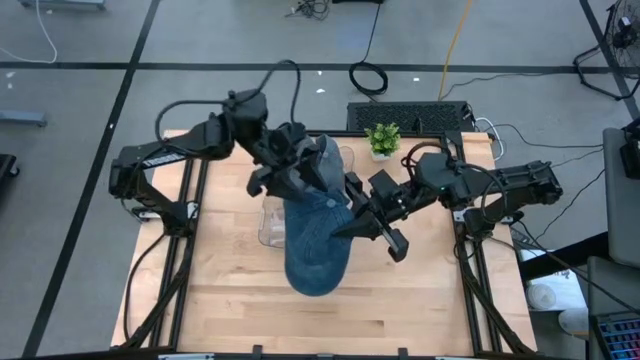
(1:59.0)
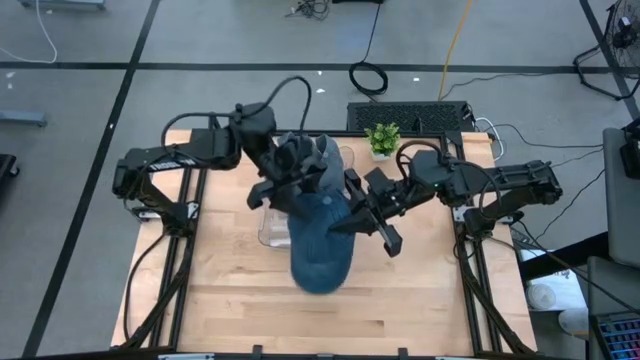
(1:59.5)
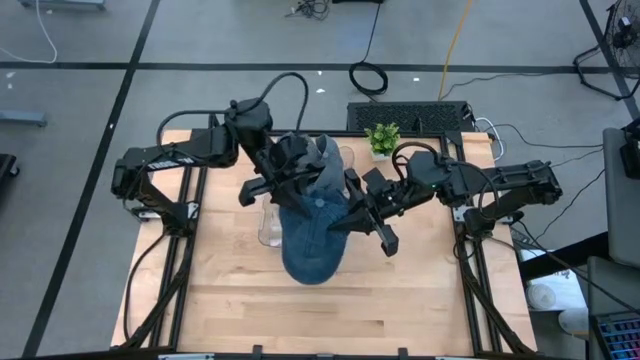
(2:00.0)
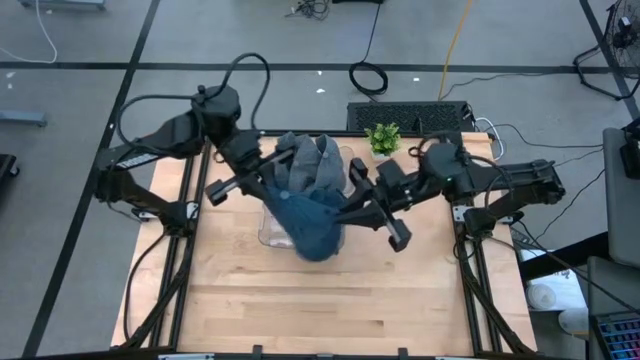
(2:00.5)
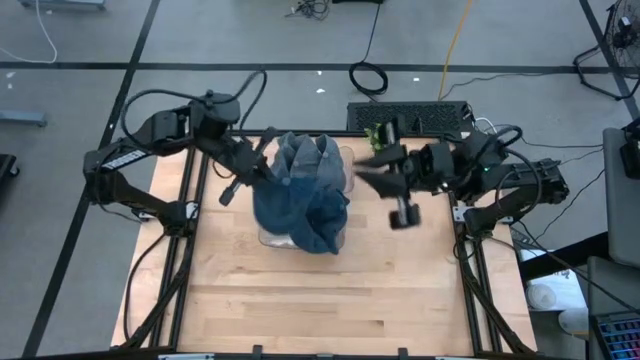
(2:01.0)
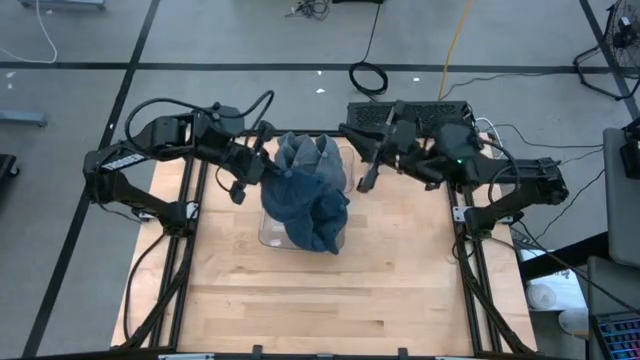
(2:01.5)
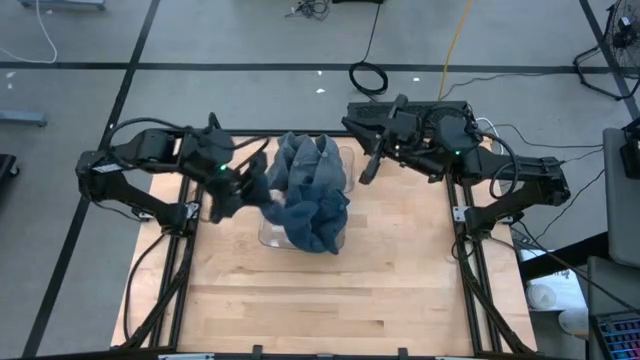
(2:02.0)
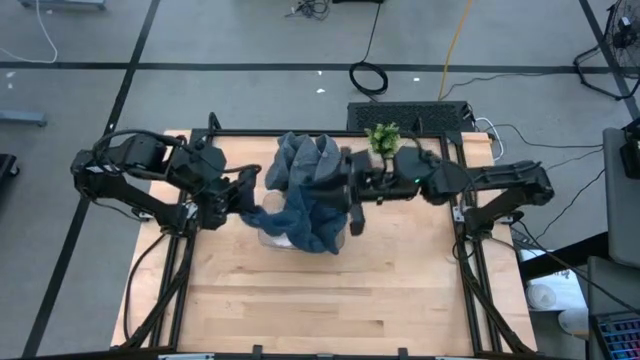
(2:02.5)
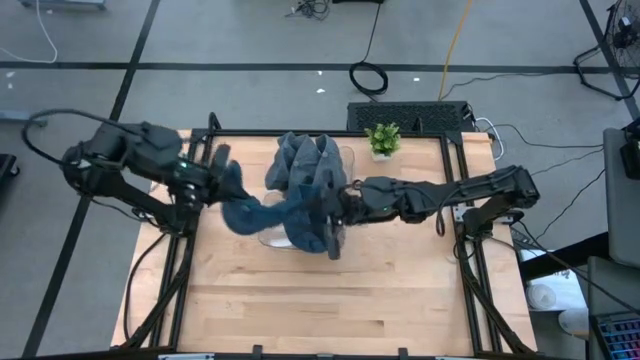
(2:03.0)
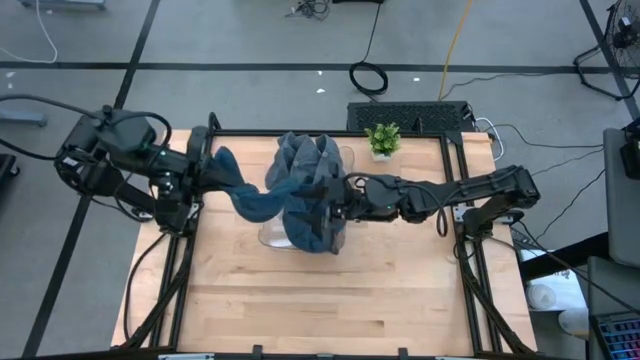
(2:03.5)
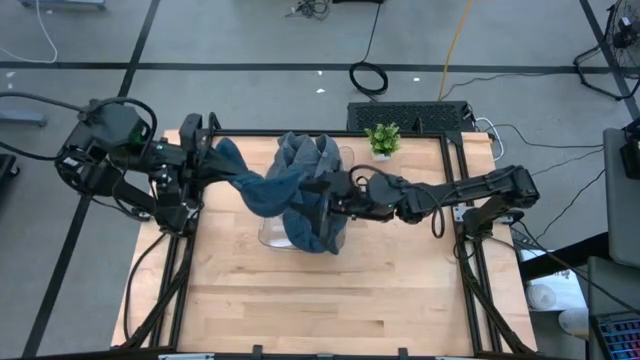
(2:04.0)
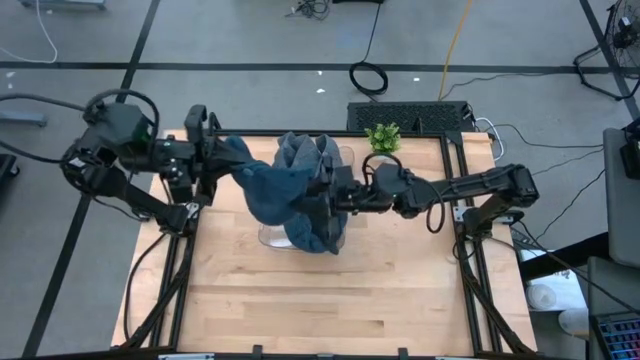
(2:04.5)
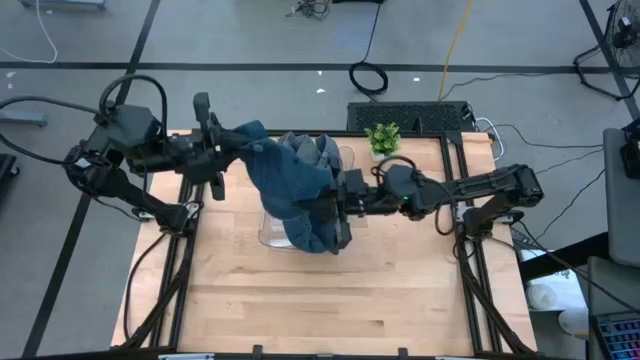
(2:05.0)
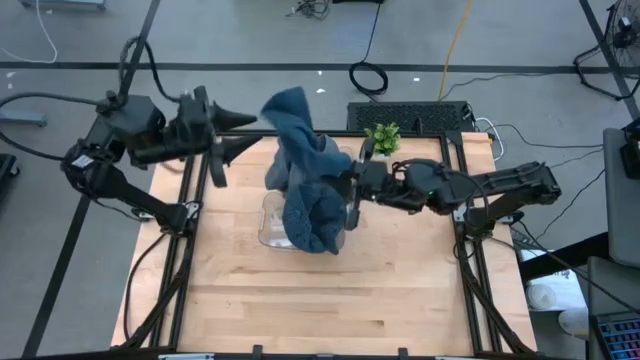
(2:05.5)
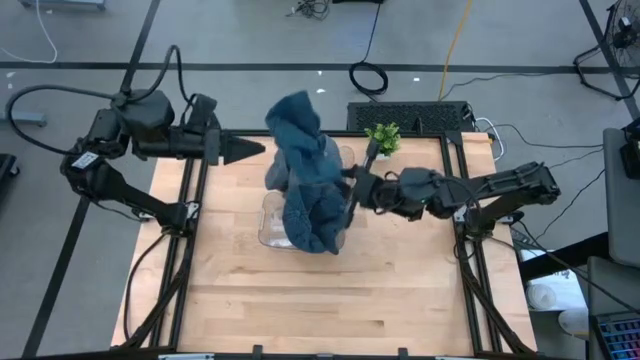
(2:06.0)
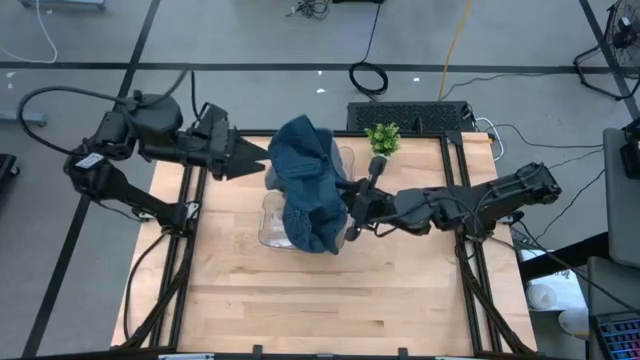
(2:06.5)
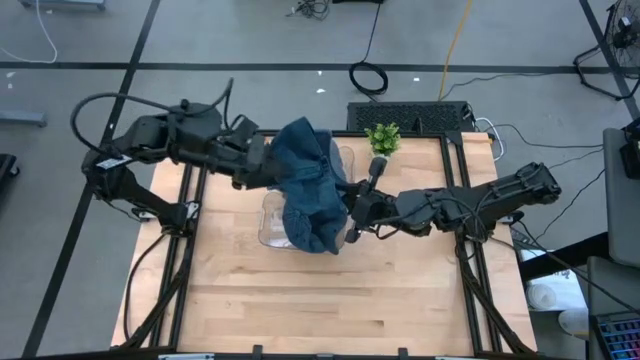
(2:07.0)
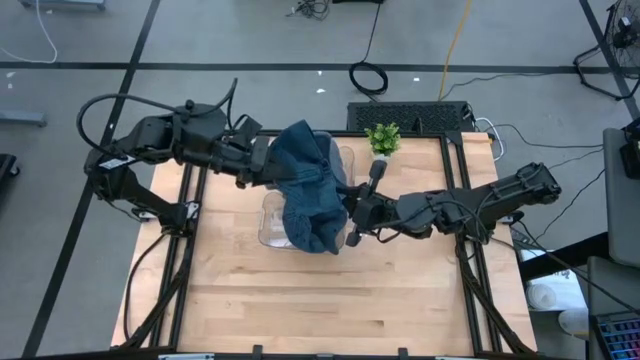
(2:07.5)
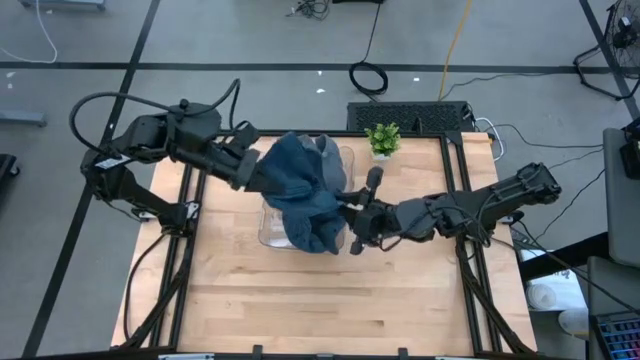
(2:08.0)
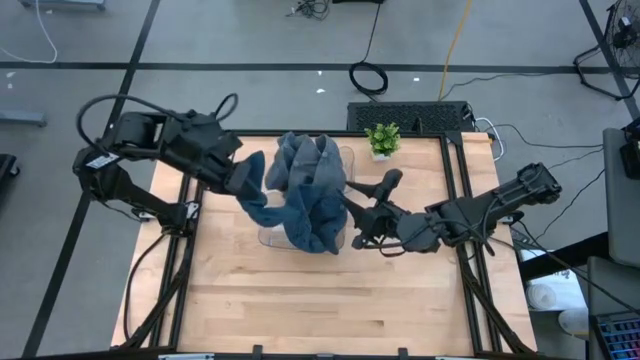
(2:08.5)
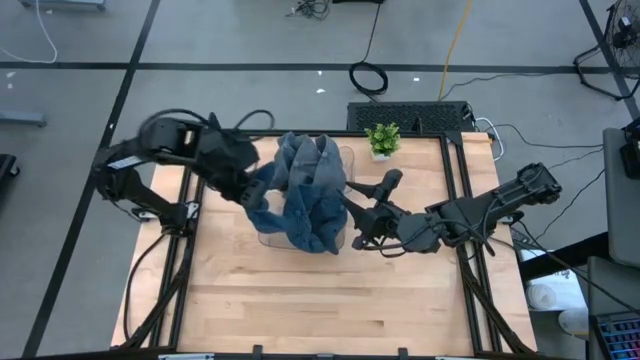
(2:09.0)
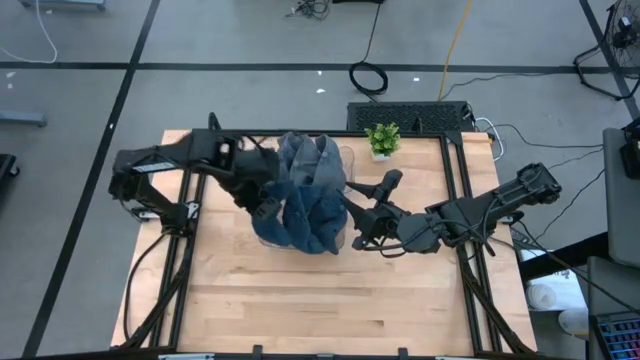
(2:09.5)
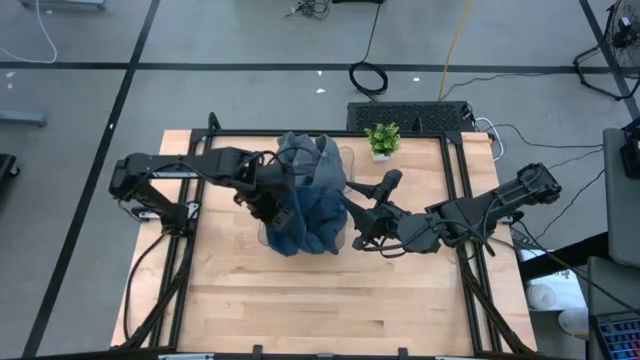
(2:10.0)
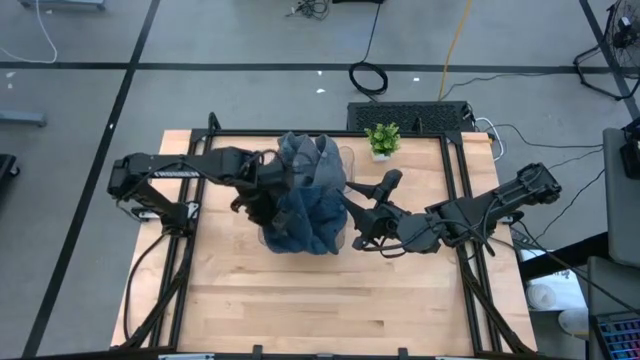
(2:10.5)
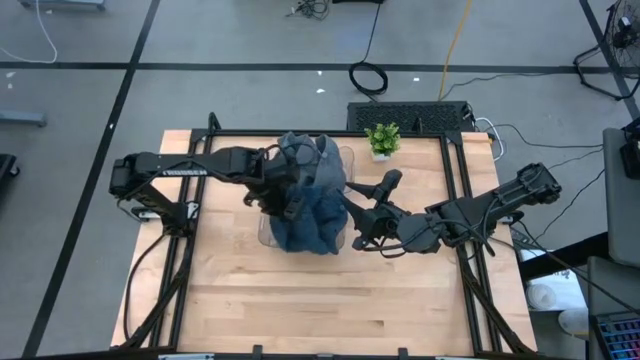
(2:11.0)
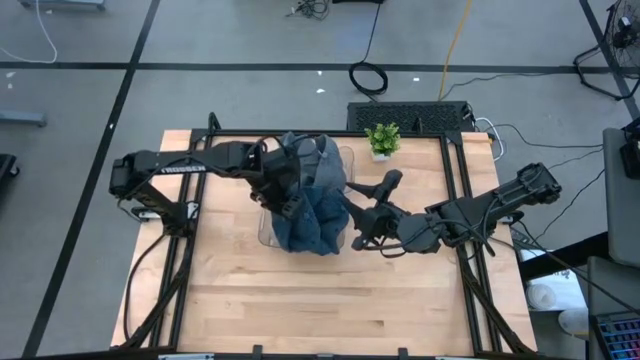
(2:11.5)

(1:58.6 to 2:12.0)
Task: Pick & Place hat
Put the blue cap into the bottom transparent bin

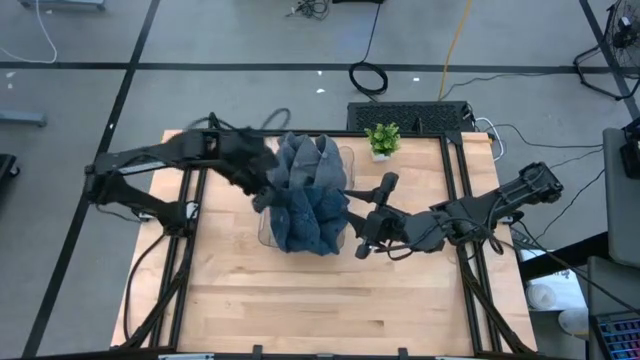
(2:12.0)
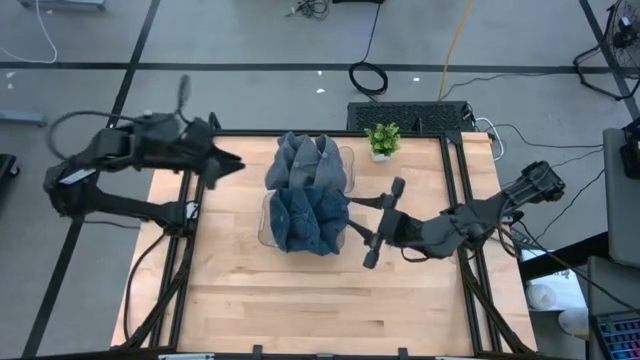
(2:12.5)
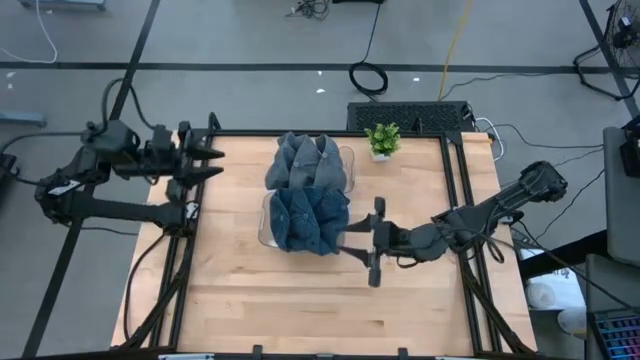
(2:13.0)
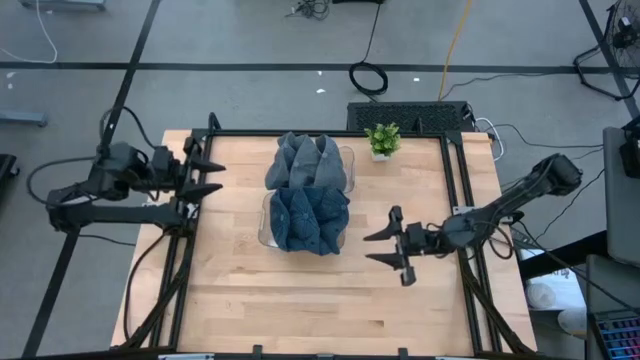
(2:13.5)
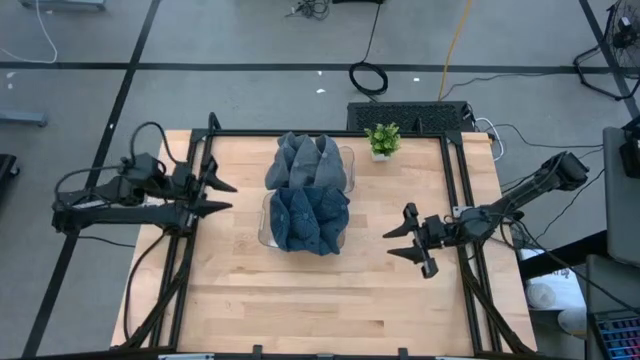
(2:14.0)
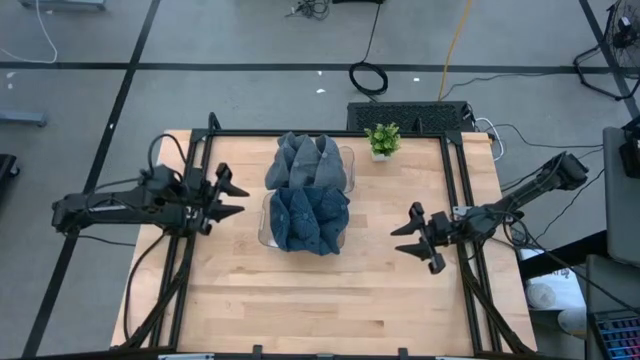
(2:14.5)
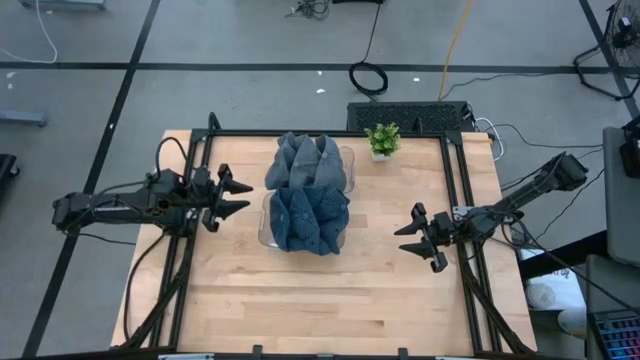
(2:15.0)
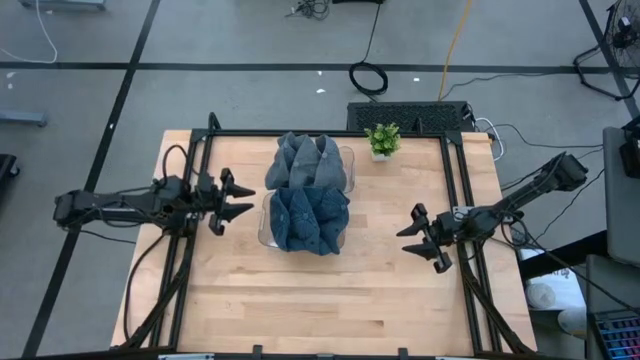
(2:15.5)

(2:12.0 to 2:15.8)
Return to Home Position

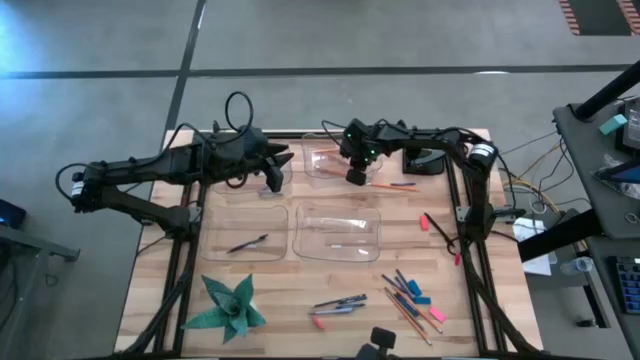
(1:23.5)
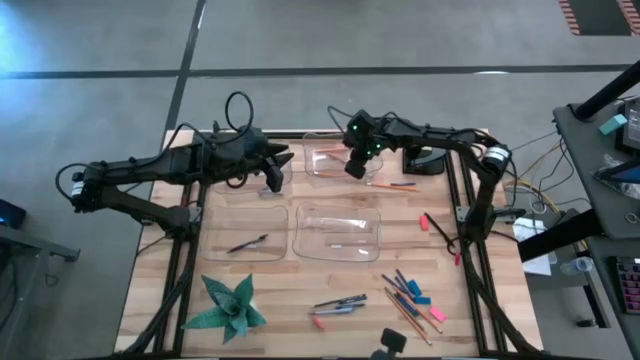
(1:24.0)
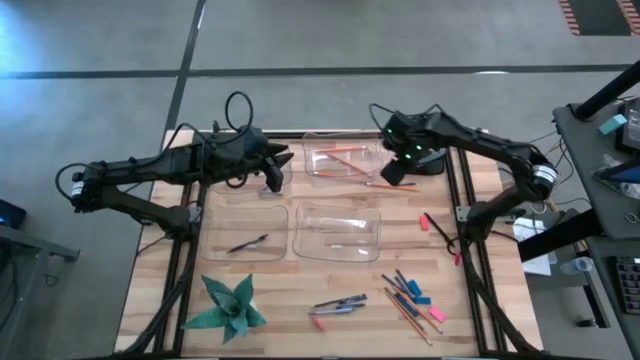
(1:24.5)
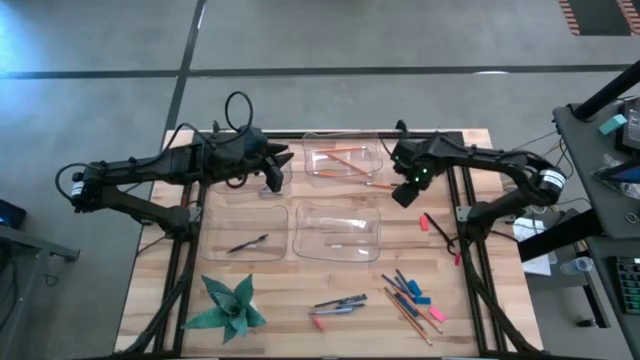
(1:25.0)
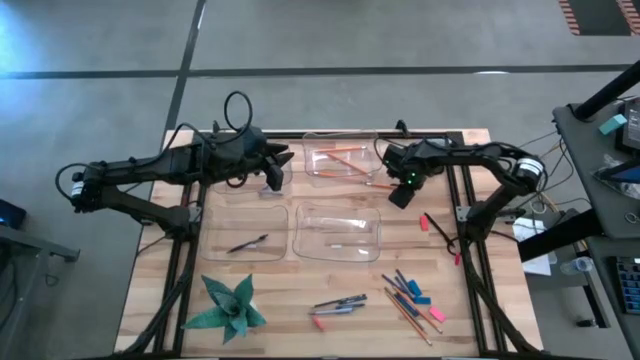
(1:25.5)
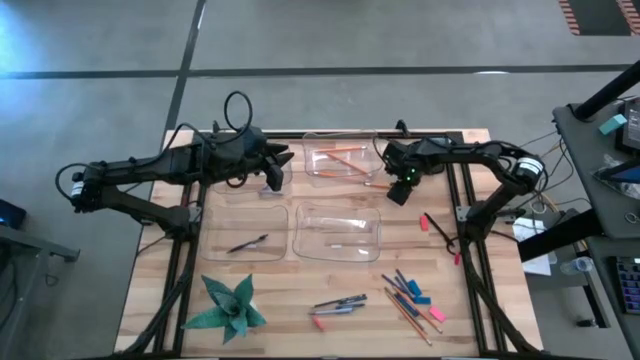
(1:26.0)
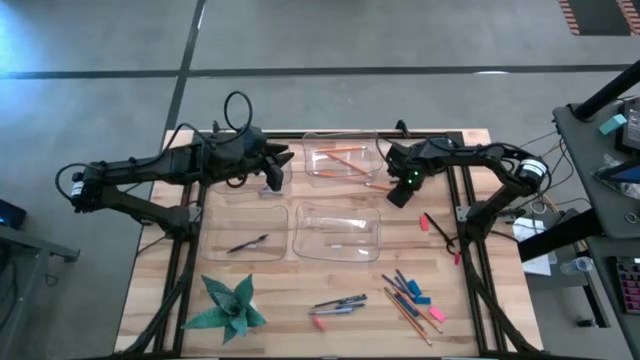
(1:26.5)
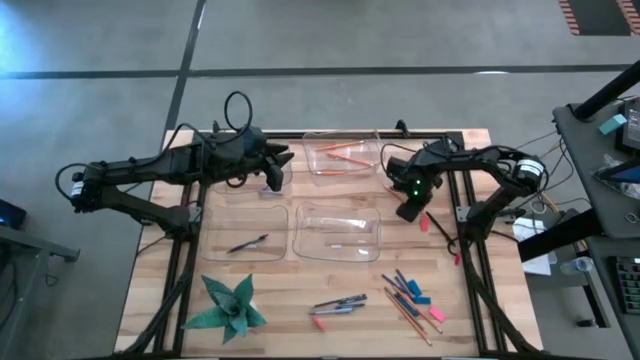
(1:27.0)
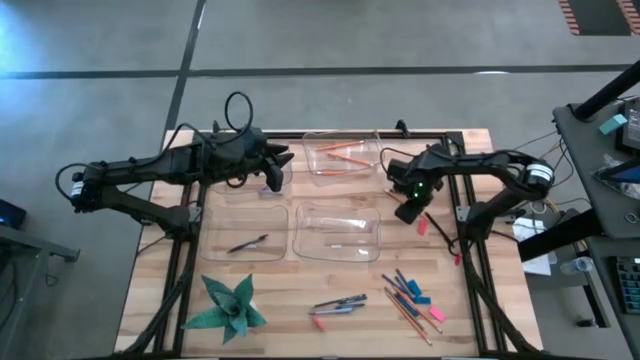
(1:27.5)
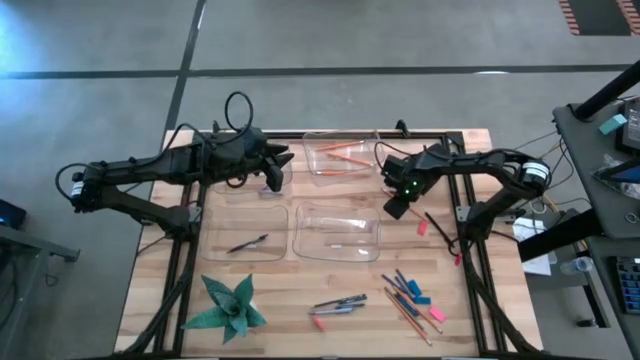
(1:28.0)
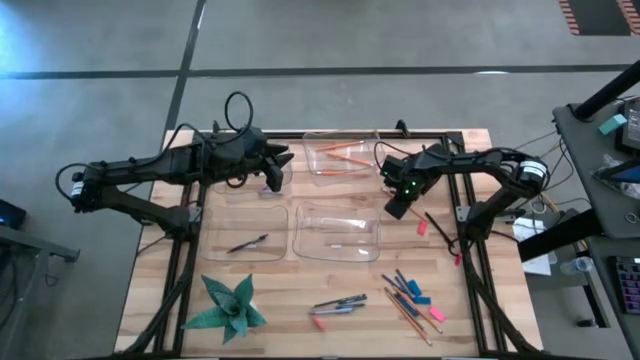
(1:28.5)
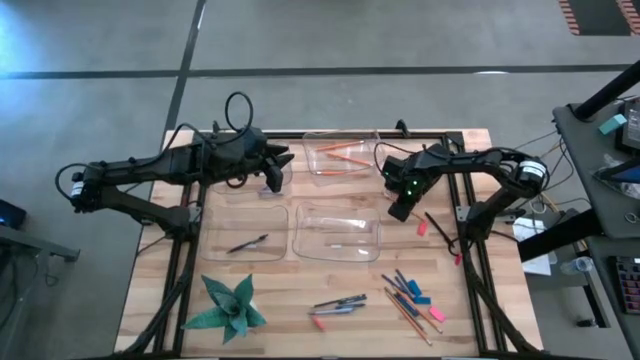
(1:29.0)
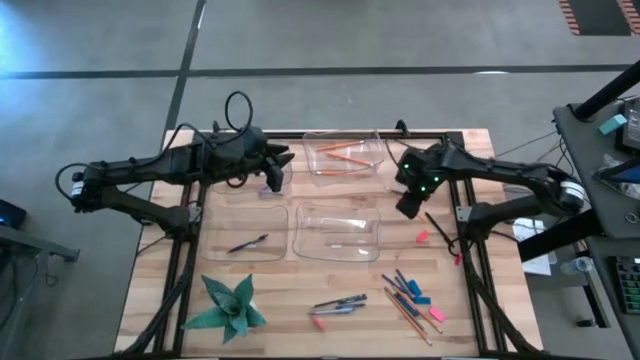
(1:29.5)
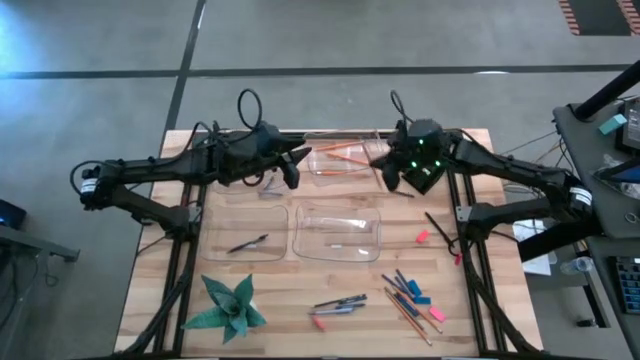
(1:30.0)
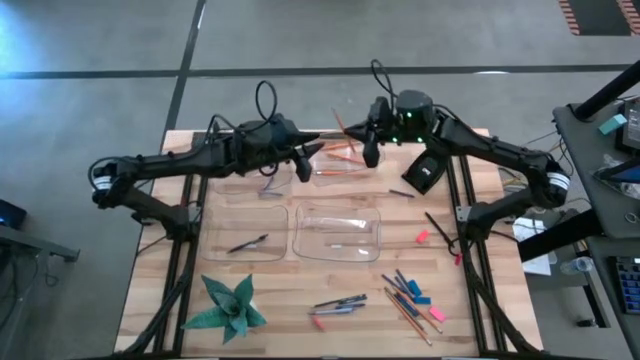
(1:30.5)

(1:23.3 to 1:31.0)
Task: Sort crayons/erasers/pens/pencils in bins
Put the orange pencil into the top right transparent bin
